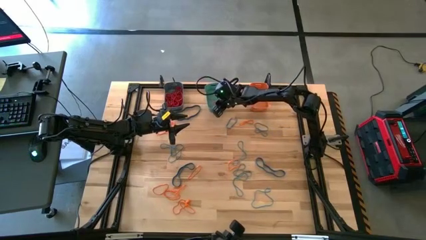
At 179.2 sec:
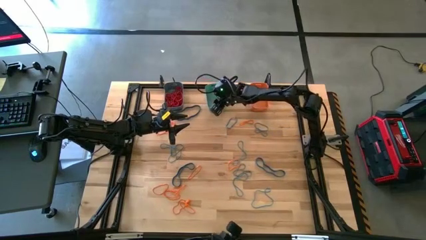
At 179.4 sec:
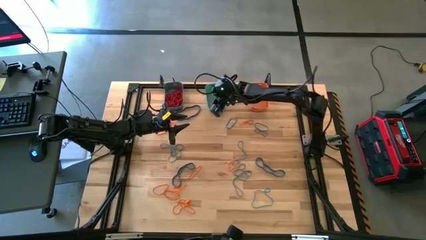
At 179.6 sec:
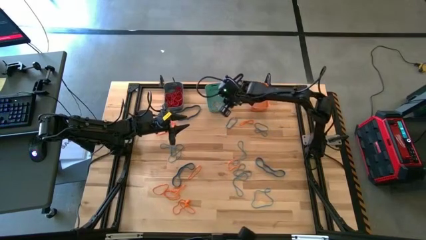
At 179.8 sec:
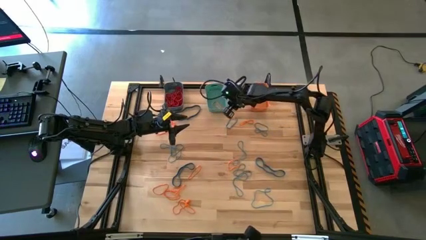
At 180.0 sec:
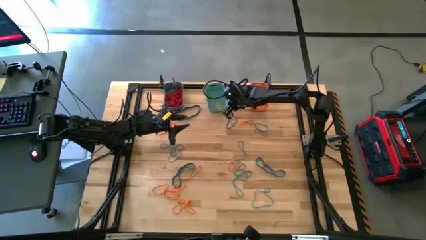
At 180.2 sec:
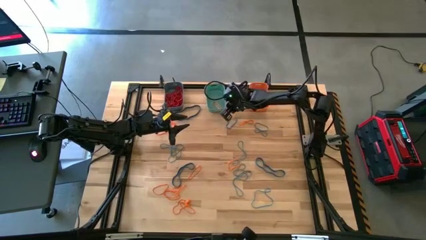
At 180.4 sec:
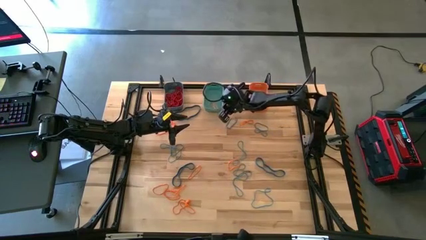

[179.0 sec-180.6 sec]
Task: Sort rubber bands into baskets
Adjust the green bin

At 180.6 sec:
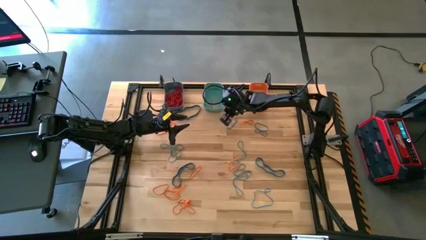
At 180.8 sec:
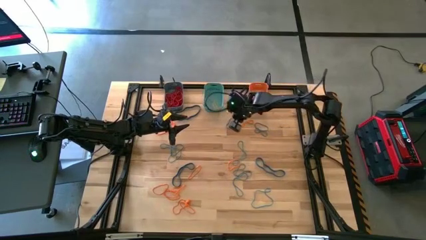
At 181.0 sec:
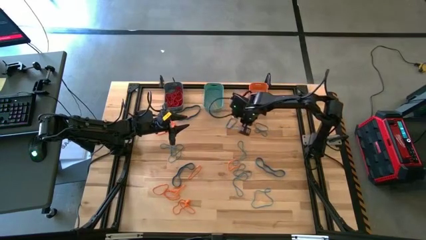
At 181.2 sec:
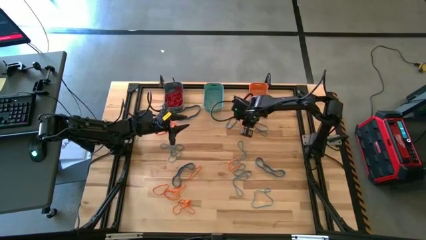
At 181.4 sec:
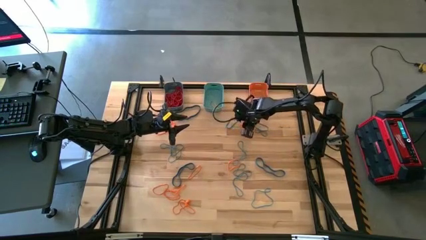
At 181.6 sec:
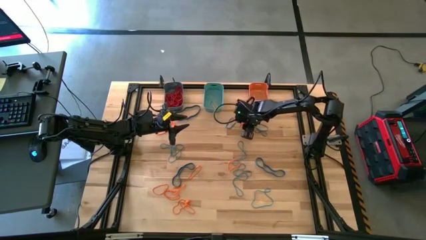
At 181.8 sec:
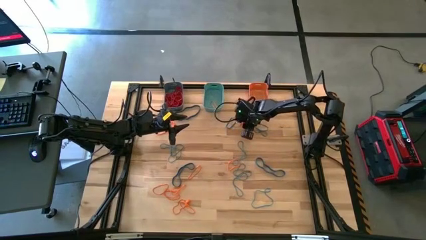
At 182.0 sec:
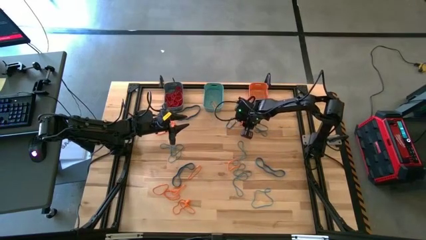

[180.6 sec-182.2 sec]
Put the orange rubber band into the green bin

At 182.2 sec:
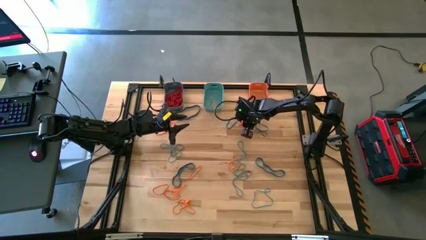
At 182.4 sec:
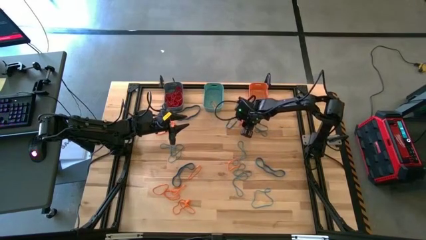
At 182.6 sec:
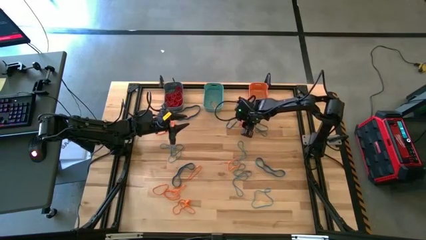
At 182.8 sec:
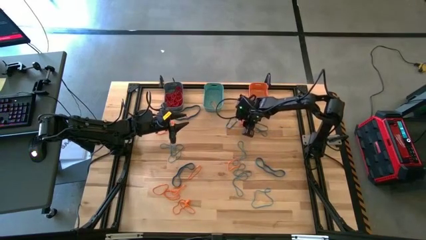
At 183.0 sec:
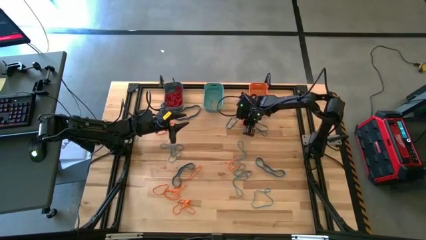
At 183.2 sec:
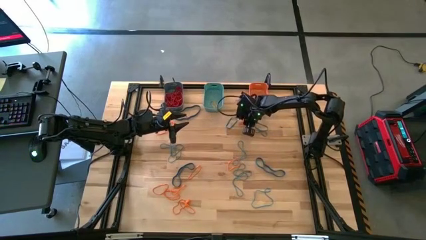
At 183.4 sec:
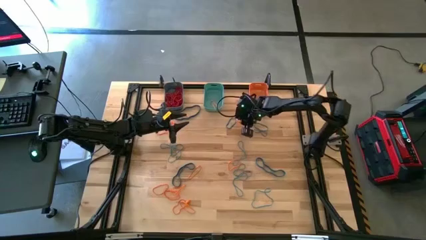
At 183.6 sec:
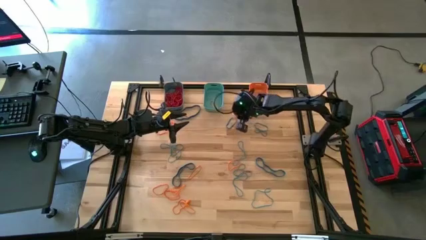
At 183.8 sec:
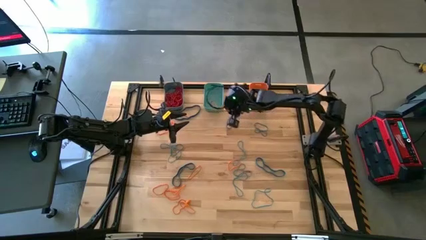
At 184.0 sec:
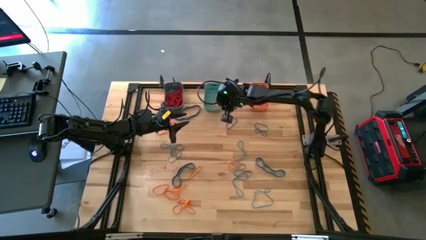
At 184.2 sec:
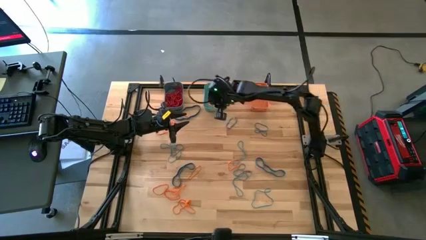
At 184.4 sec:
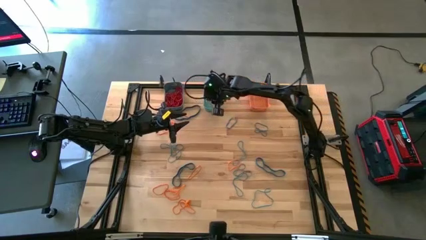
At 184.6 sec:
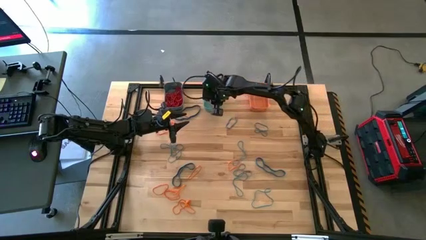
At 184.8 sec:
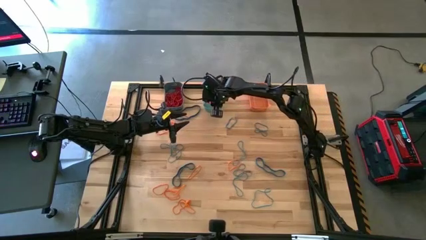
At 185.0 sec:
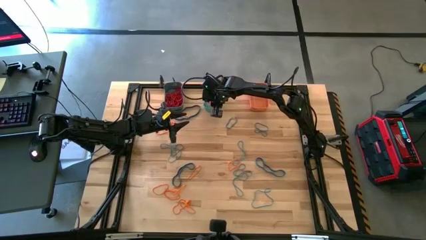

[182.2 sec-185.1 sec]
Put the orange rubber band into the green bin

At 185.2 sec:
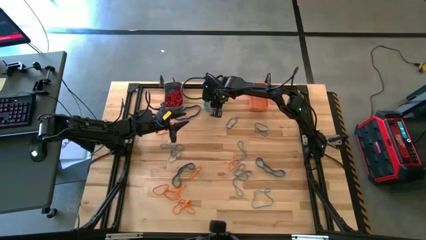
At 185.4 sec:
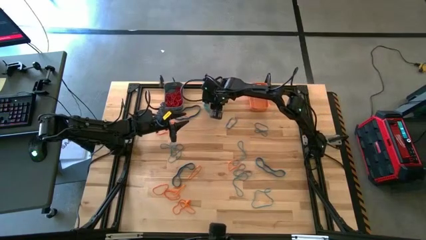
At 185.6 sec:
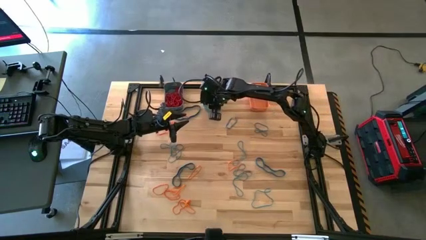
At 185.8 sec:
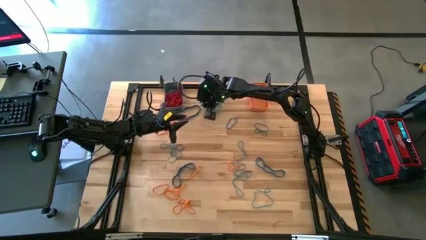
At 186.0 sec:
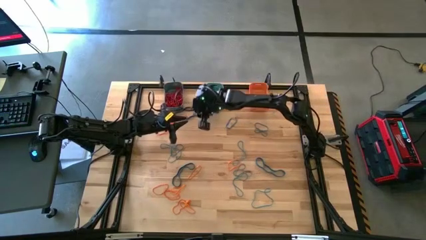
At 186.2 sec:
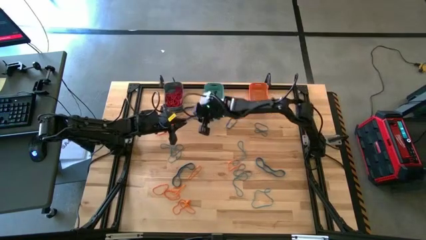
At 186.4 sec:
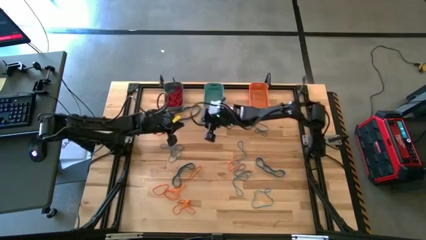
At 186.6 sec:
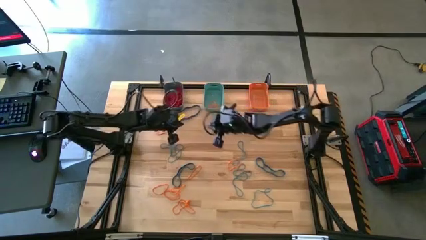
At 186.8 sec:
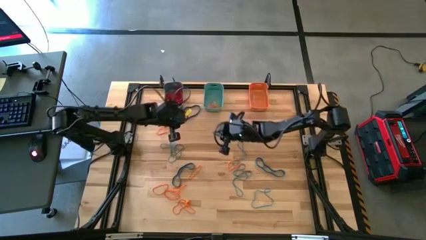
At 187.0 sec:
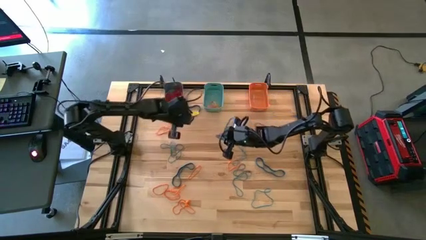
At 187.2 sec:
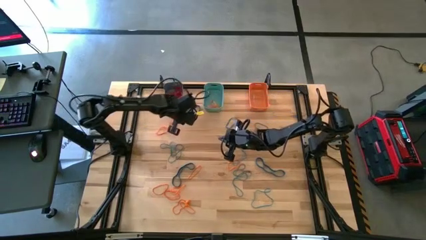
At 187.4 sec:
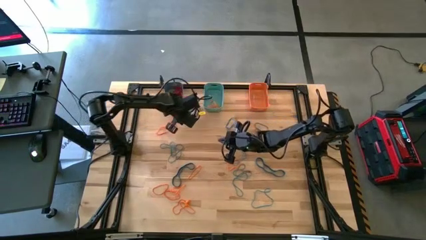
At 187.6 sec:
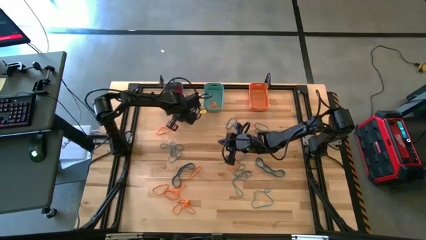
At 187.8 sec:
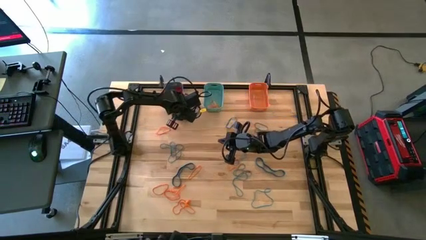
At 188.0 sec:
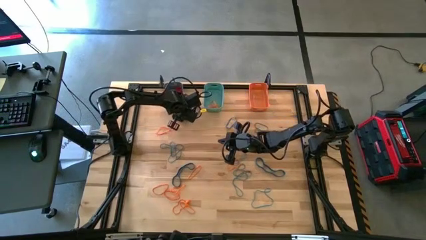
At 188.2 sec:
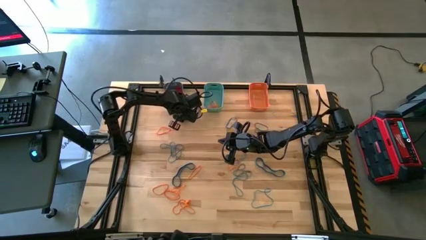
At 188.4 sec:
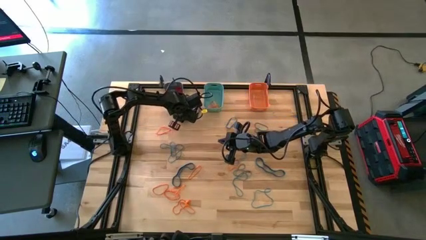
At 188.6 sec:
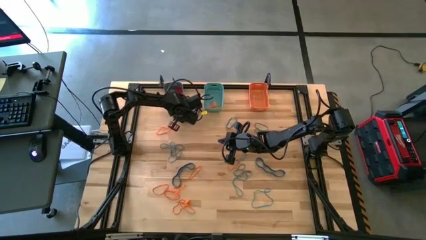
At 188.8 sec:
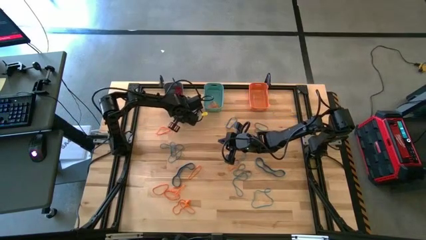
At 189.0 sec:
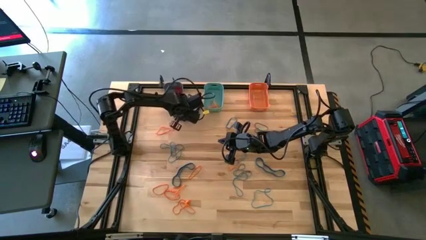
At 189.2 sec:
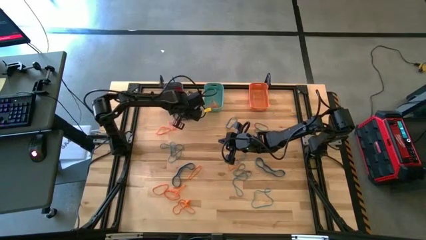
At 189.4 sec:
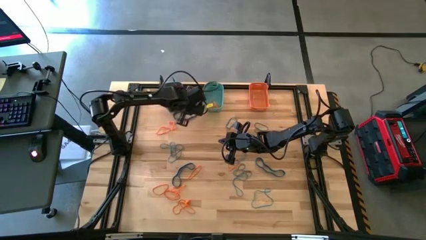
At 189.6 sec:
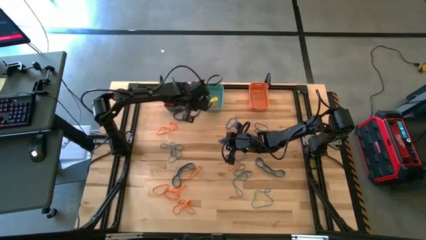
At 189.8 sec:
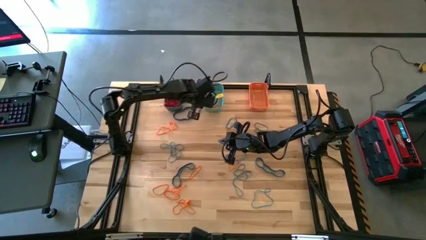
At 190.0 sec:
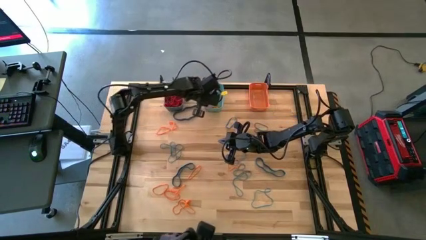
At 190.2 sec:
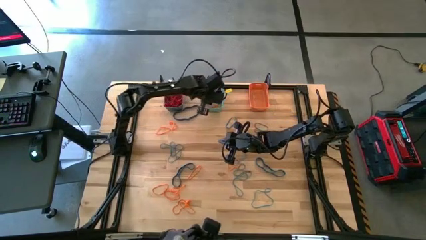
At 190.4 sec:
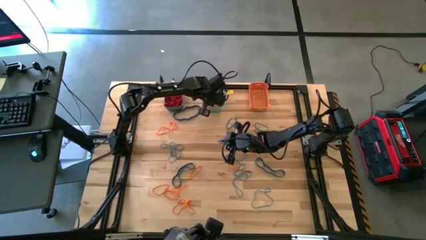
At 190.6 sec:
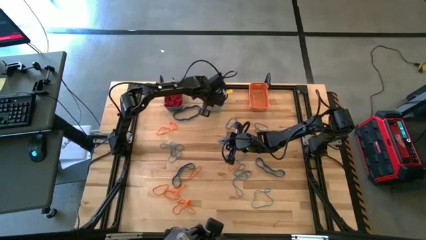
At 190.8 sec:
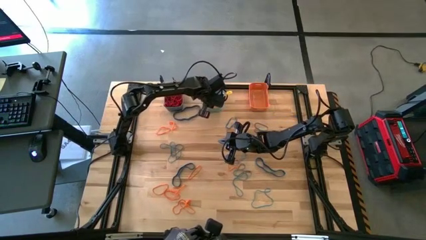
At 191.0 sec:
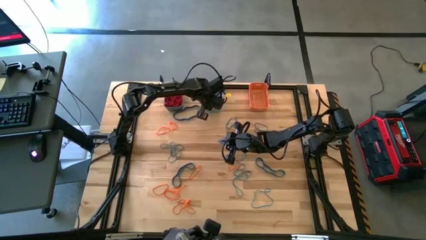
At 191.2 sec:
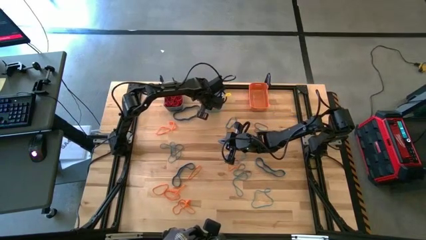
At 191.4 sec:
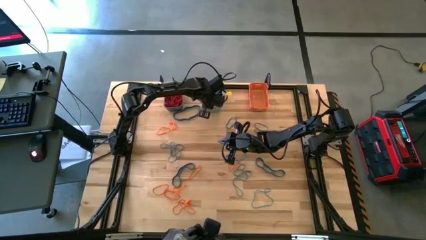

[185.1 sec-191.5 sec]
Put the orange rubber band into the green bin

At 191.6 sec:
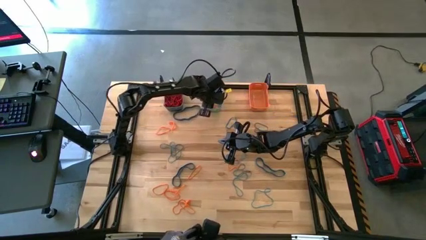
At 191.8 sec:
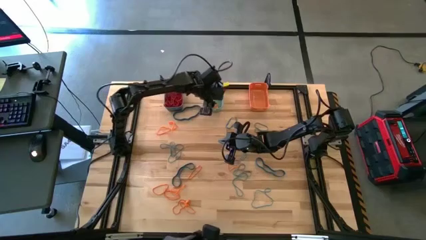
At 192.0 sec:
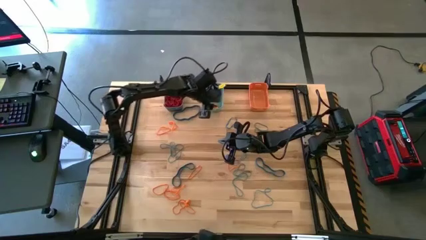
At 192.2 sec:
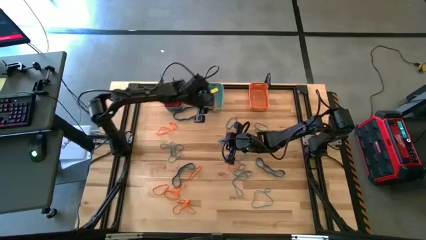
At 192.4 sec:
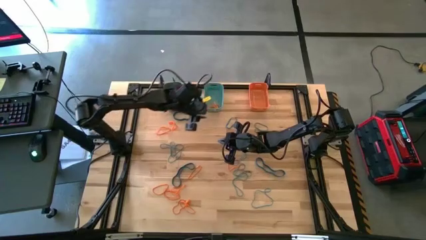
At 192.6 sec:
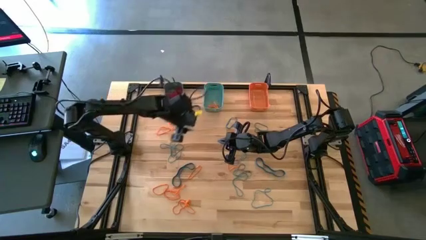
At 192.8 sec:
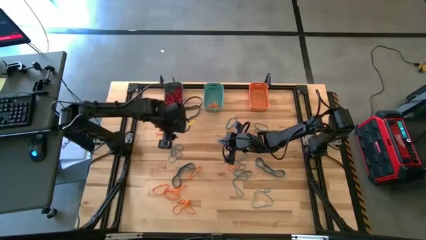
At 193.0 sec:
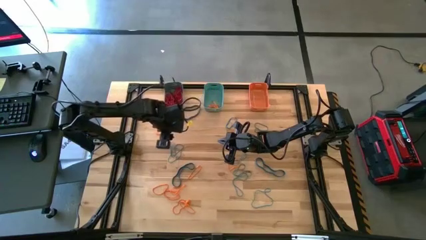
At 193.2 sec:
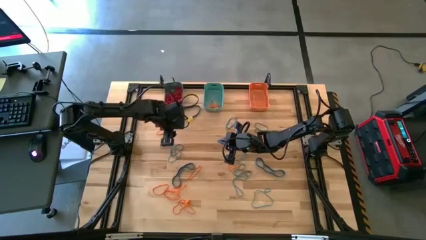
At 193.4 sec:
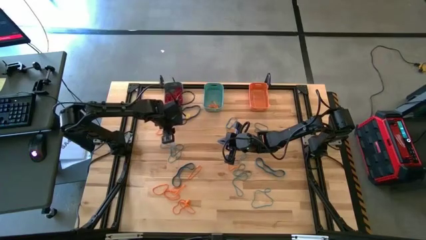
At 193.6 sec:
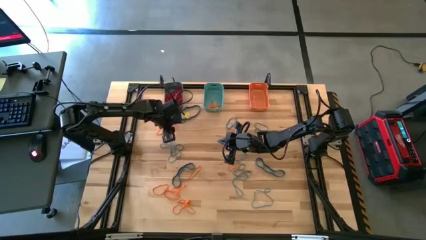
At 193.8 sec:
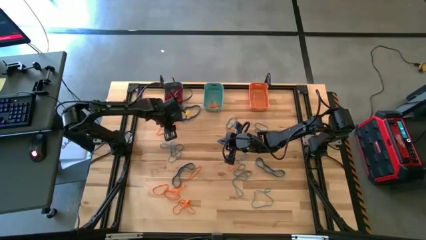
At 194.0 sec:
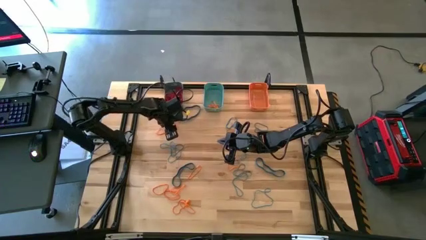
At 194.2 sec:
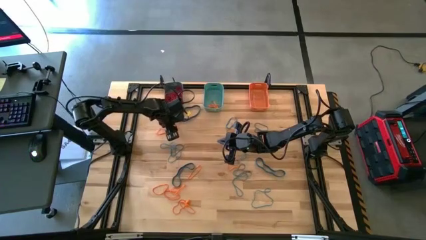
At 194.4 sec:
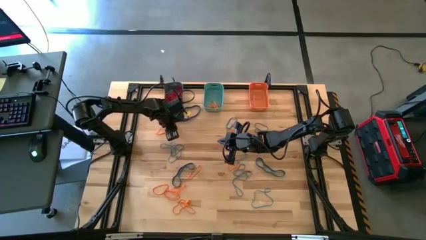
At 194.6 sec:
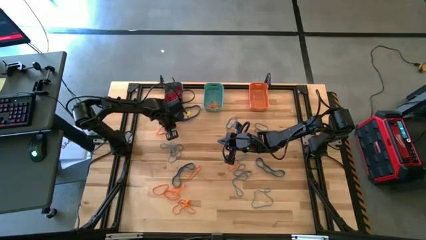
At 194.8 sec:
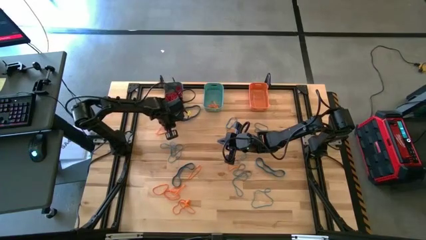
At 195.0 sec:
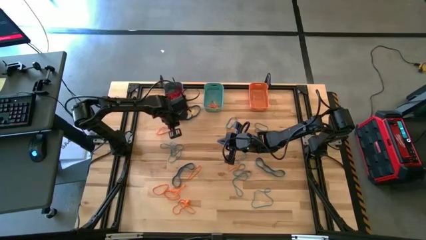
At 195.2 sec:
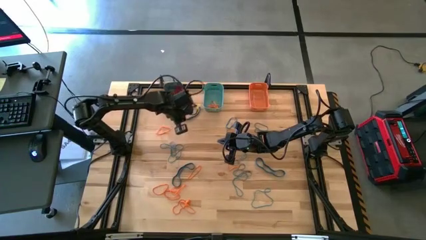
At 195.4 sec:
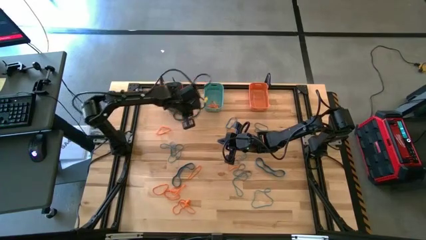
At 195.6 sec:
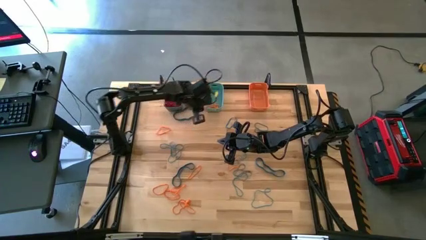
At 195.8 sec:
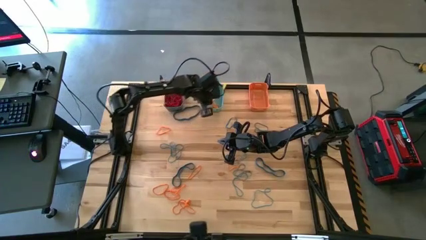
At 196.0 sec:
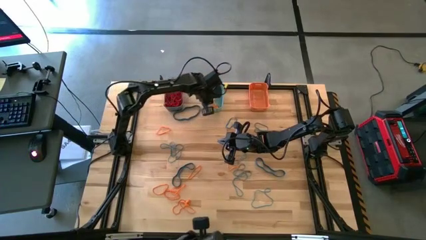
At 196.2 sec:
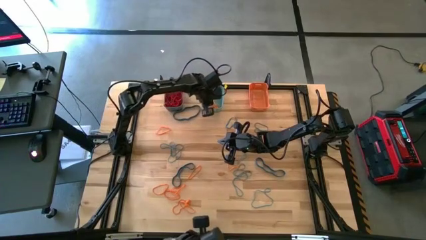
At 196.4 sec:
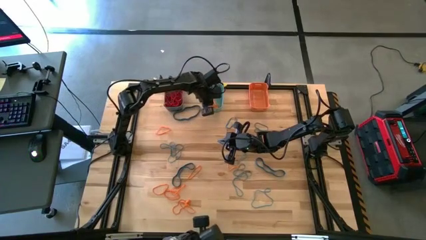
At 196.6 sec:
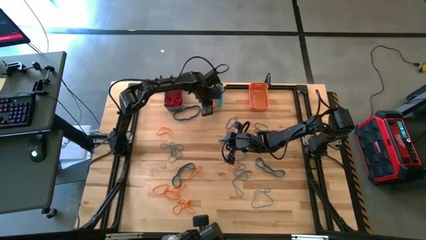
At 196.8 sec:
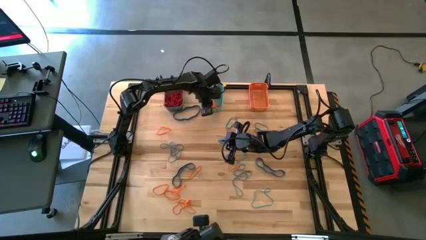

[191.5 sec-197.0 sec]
Put the orange rubber band into the green bin
